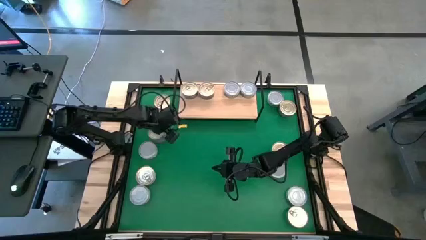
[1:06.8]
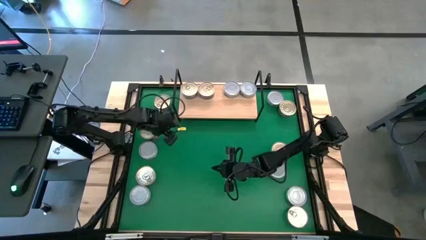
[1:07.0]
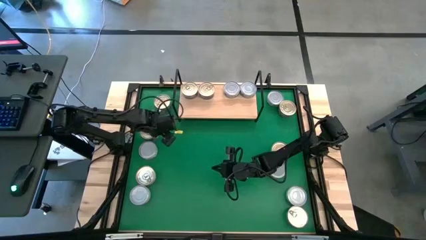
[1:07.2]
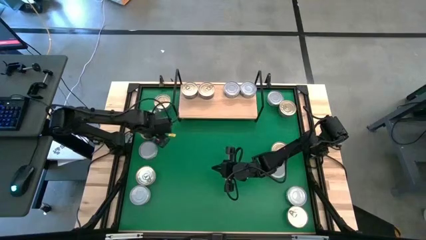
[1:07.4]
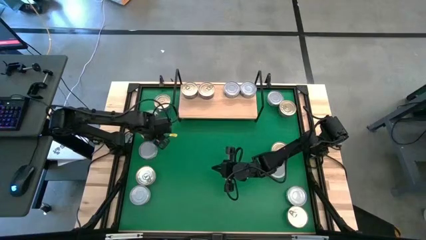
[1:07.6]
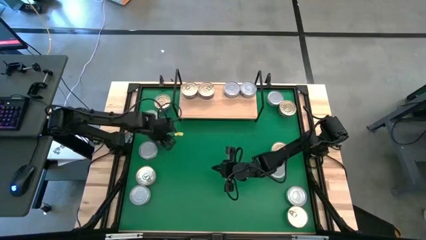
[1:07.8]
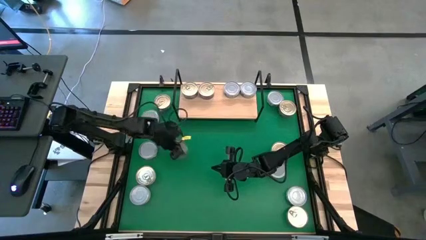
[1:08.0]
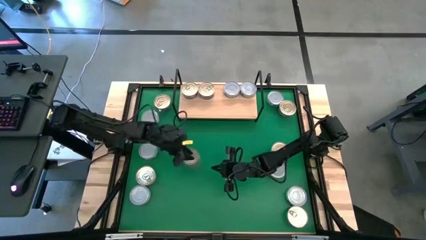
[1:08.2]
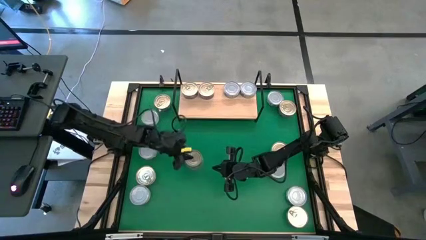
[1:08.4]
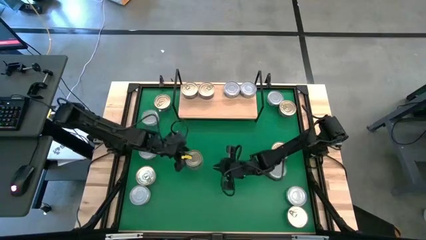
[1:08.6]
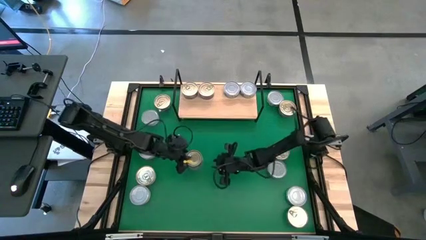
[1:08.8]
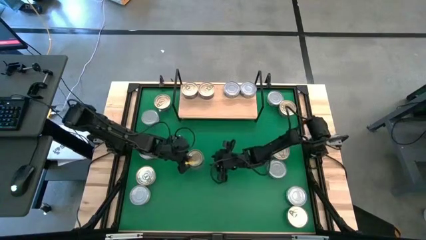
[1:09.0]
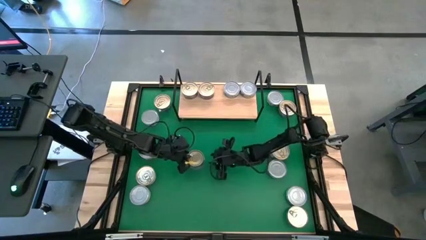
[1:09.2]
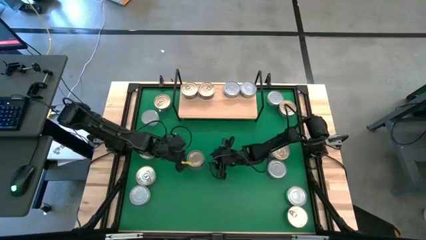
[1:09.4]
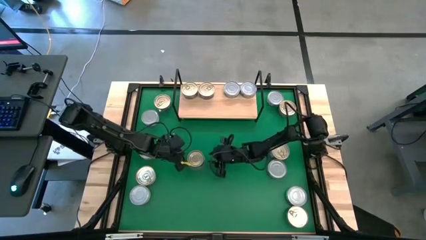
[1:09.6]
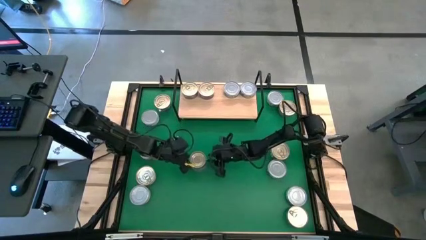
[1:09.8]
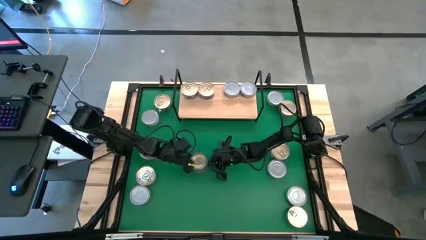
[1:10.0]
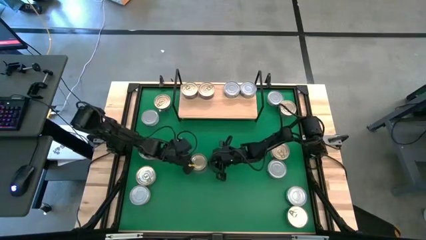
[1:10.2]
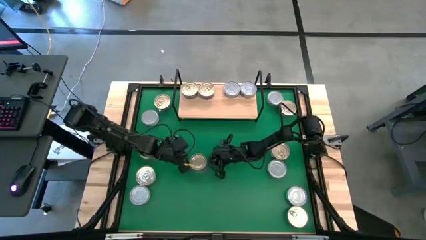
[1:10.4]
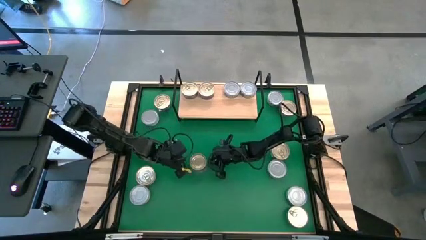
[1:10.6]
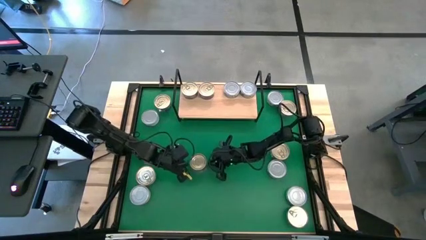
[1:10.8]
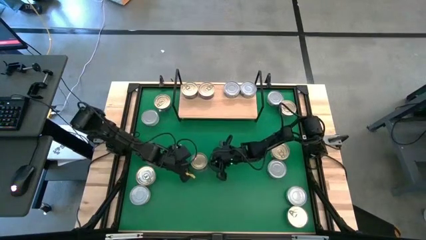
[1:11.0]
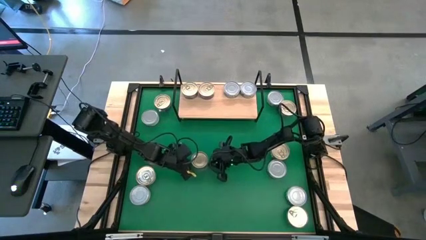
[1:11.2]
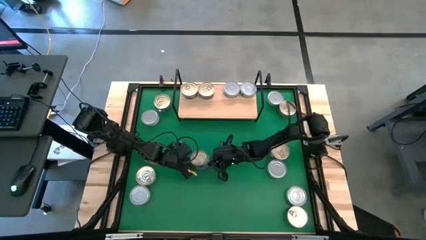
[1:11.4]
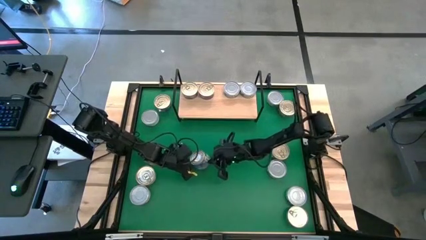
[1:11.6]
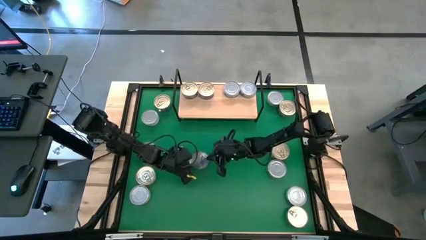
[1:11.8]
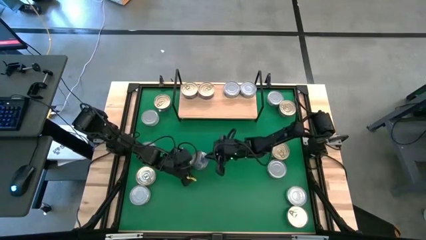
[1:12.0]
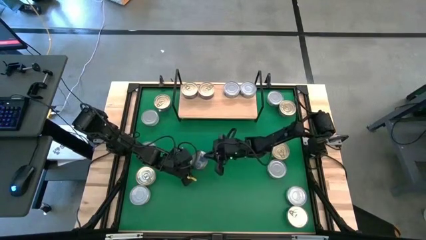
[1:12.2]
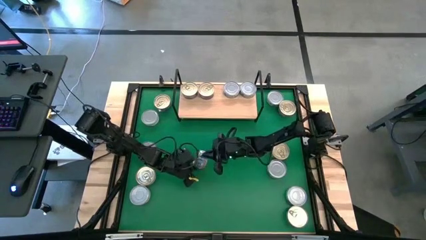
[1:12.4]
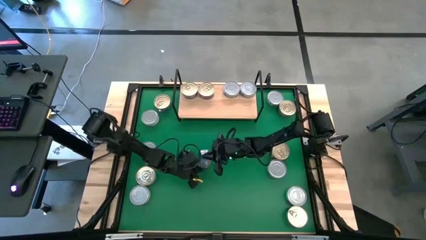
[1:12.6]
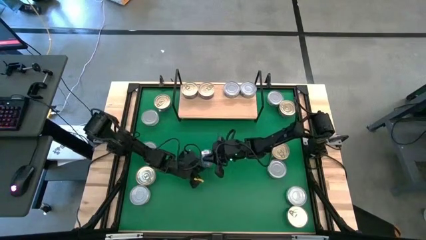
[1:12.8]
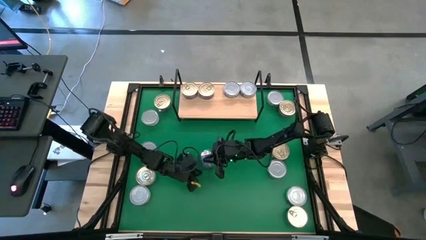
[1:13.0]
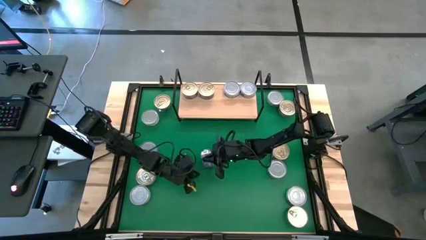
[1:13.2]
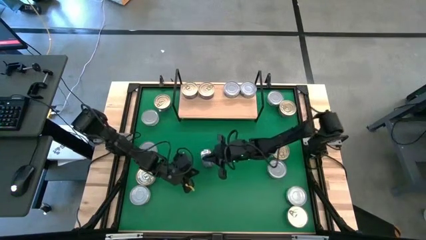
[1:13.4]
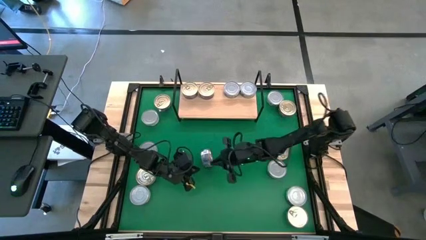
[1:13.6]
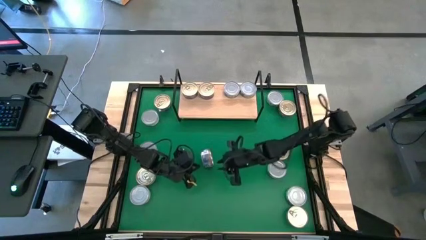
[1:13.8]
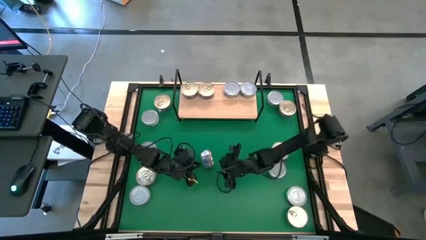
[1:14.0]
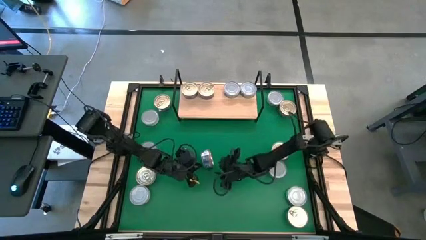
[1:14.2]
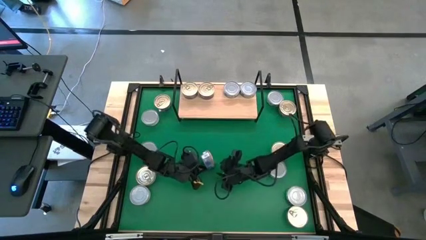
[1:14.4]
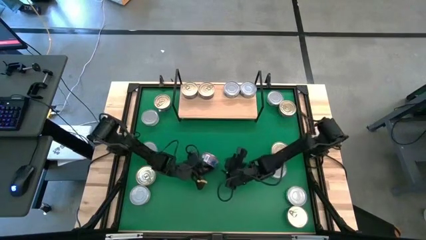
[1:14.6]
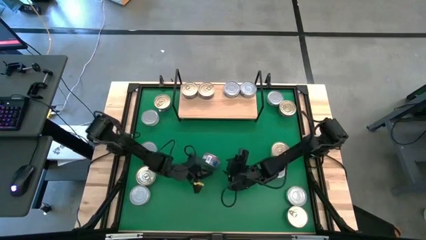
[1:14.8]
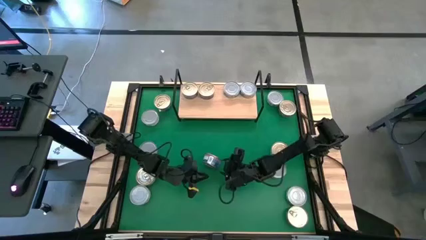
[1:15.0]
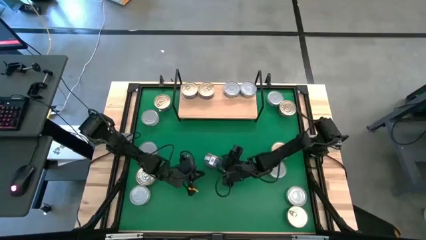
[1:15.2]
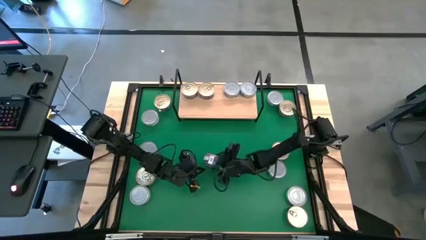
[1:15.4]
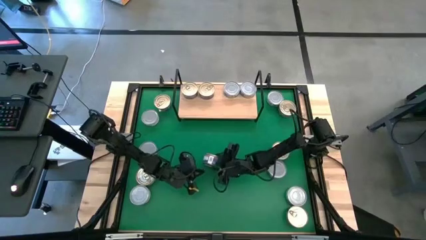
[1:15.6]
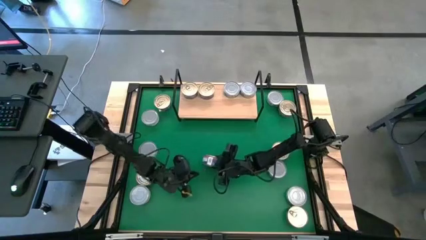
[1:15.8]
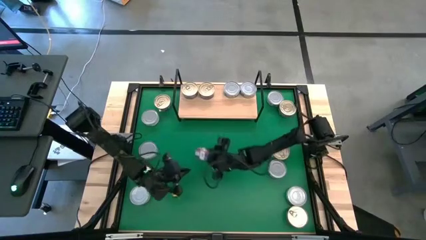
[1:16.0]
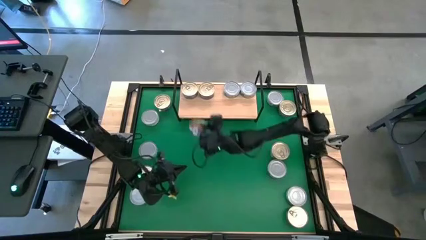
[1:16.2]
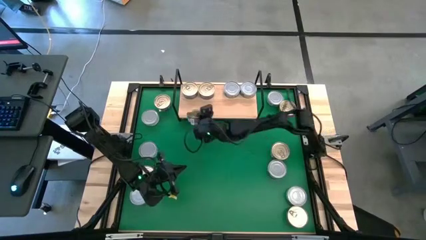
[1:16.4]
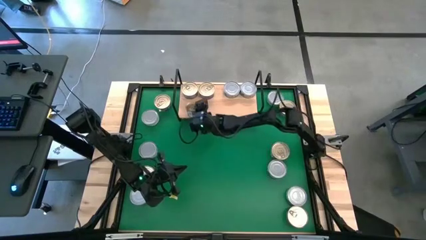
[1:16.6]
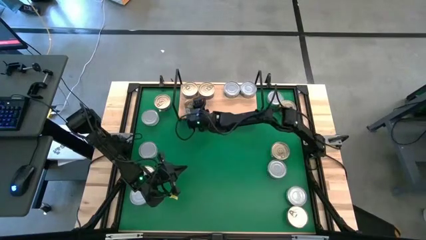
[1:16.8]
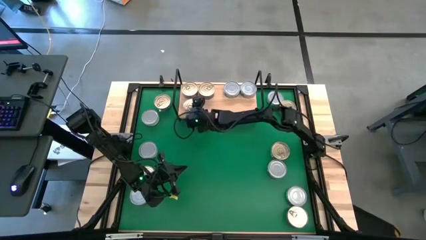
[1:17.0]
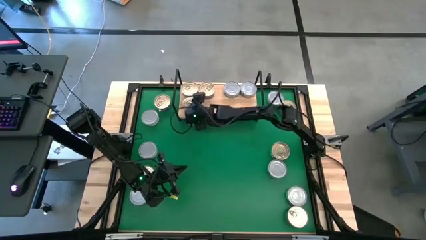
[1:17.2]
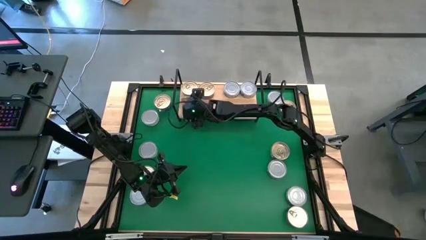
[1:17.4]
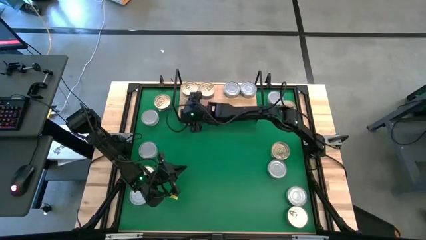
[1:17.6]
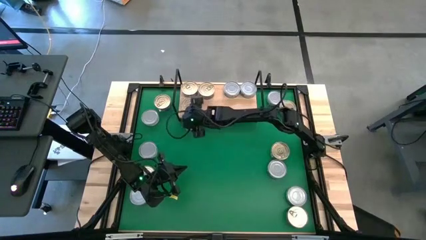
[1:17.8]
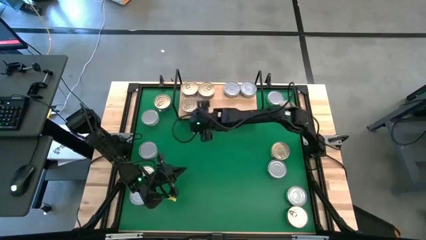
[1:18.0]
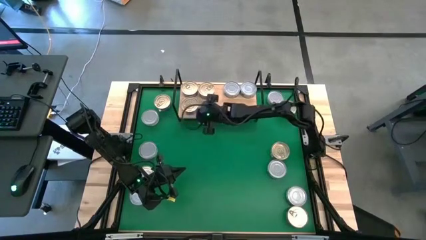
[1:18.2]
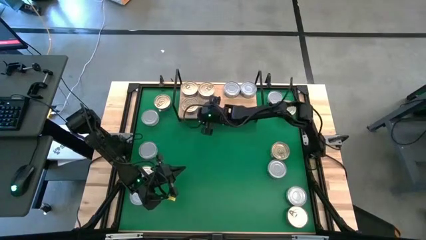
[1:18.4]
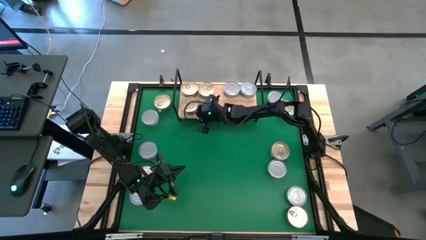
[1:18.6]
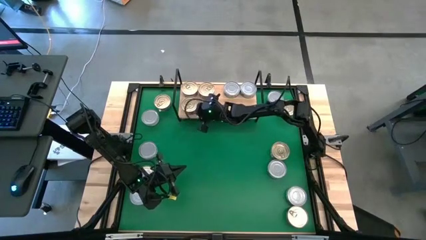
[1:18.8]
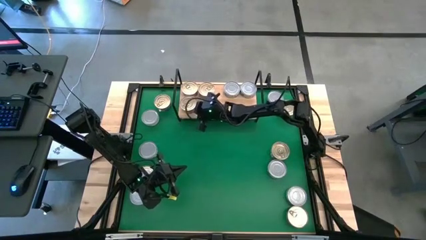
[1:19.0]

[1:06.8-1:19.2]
Task: Stack canned seafood by type on shelf
Put the blue pink tuna can on the shelf

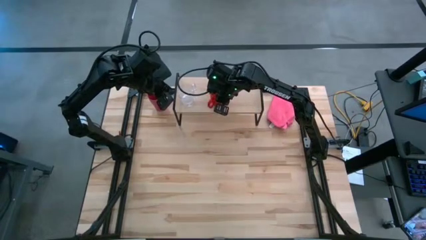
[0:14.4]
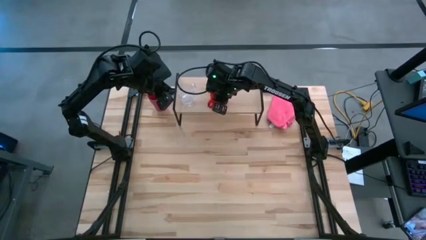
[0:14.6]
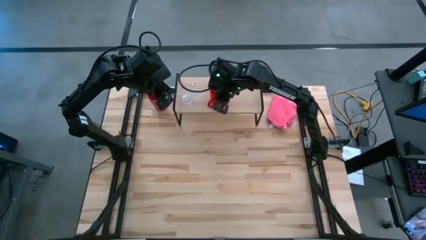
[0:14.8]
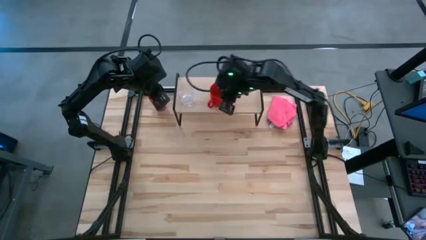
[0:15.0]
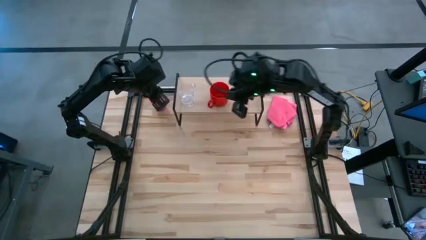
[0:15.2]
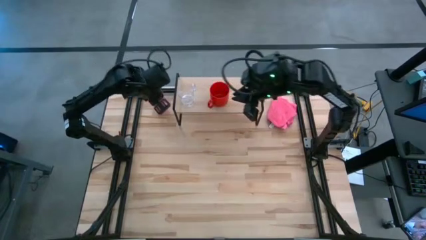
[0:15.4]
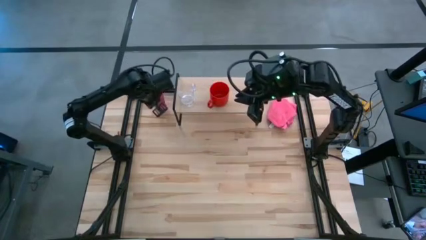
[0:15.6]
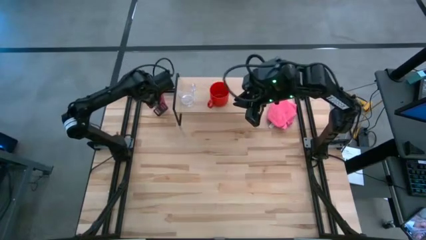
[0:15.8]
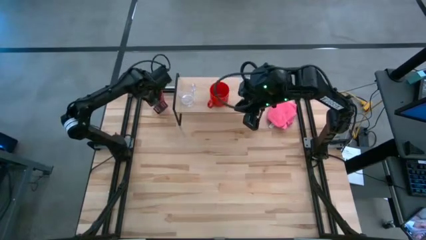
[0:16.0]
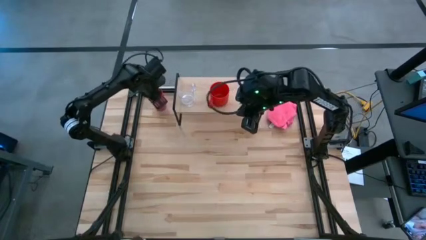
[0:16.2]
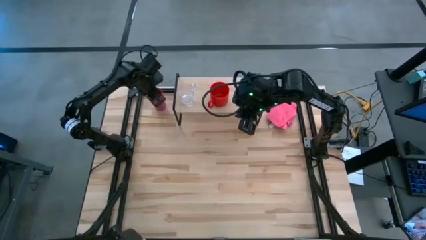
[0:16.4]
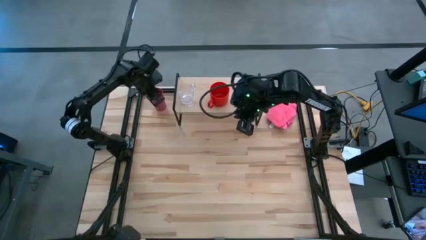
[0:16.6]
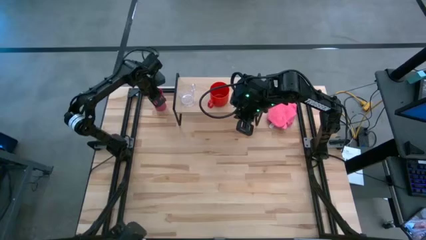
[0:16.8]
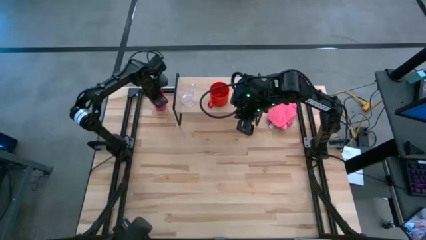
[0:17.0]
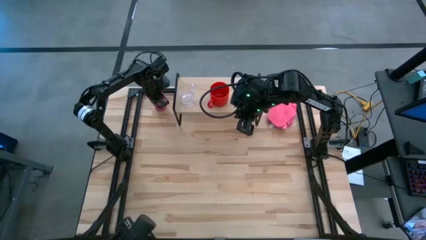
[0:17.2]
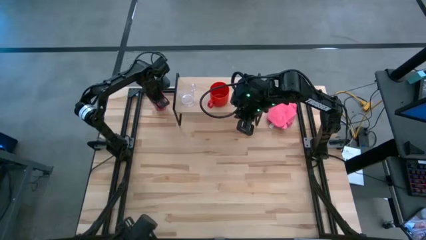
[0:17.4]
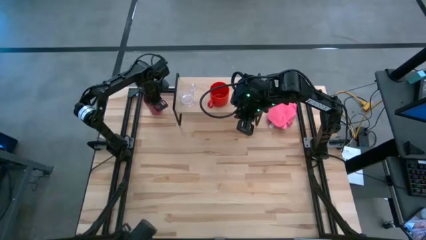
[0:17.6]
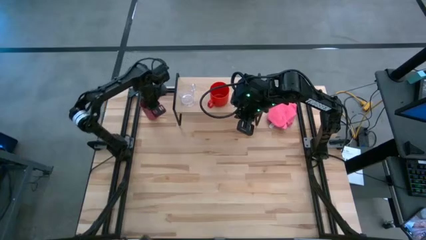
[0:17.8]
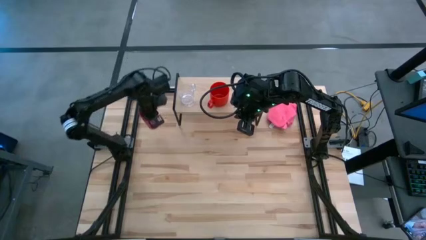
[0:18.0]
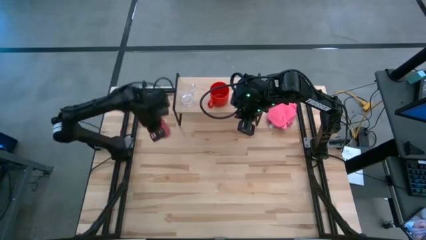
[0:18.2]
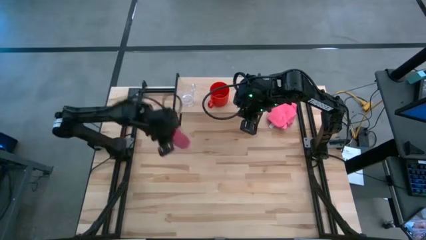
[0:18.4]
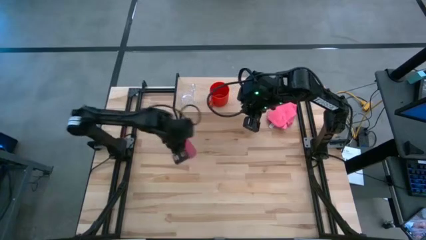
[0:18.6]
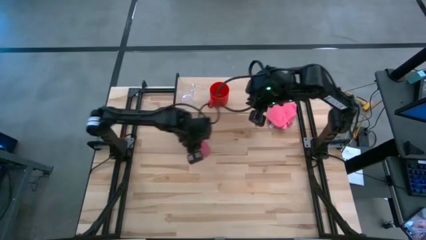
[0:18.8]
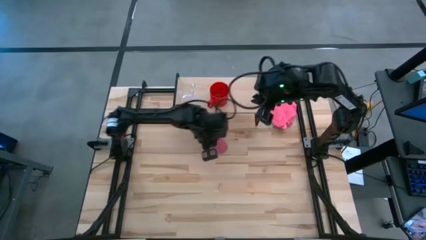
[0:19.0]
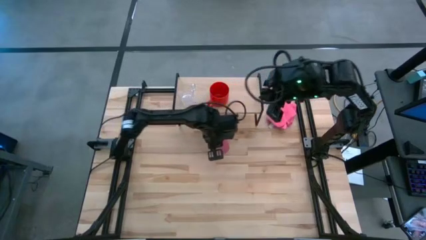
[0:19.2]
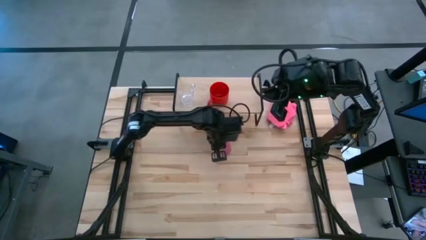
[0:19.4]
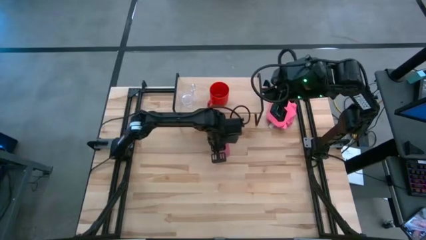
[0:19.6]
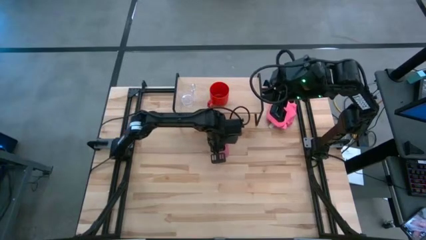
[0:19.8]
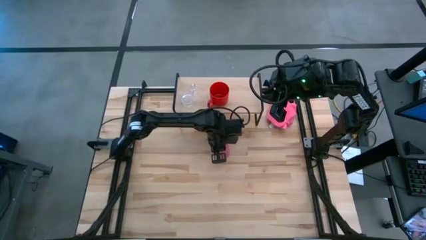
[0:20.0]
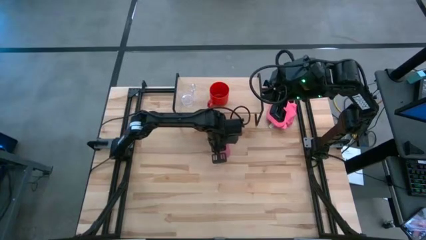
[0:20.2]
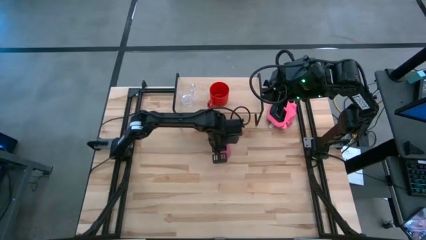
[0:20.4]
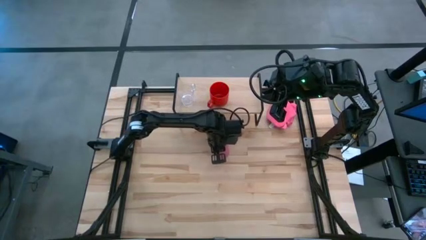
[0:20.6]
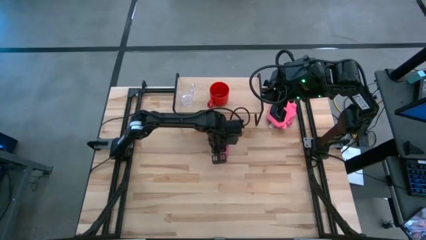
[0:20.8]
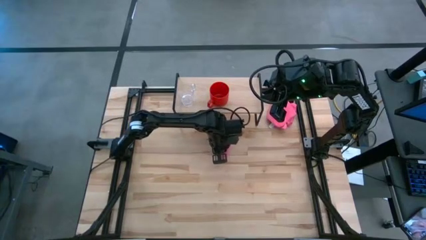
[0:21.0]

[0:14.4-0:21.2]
Task: Stack small to large cups/mugs on shelf
Move the pink cup to the center of the table
